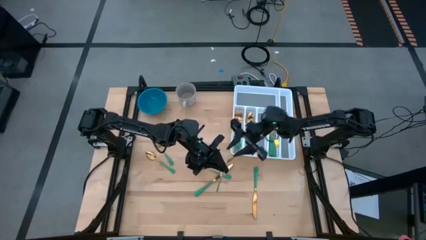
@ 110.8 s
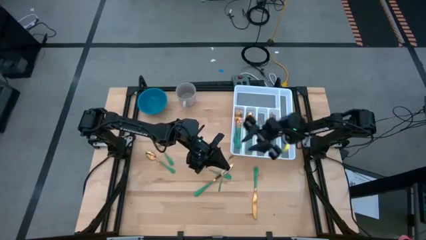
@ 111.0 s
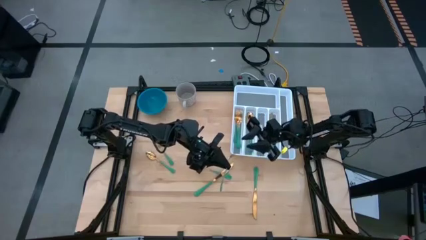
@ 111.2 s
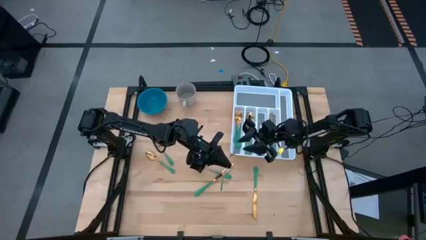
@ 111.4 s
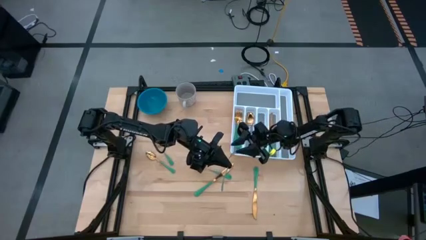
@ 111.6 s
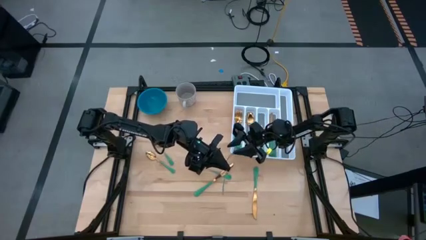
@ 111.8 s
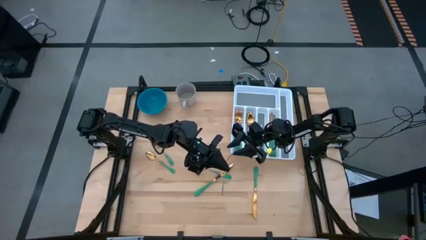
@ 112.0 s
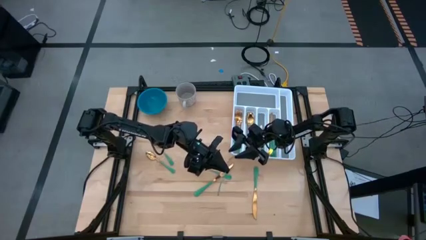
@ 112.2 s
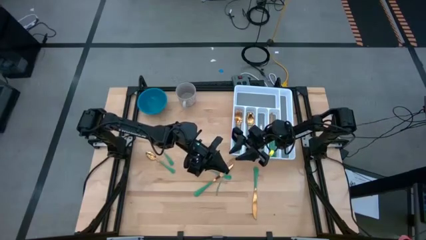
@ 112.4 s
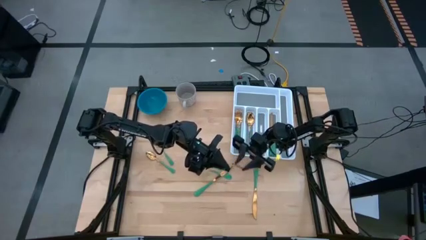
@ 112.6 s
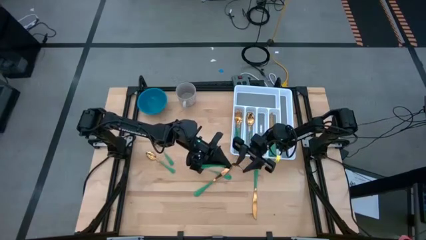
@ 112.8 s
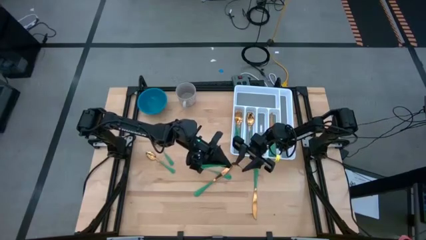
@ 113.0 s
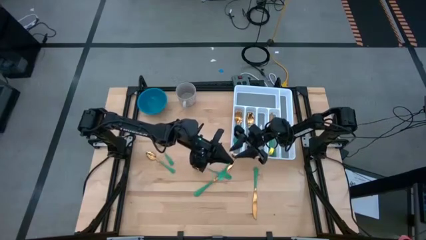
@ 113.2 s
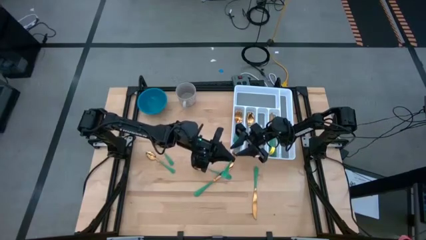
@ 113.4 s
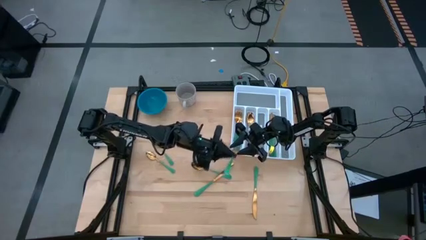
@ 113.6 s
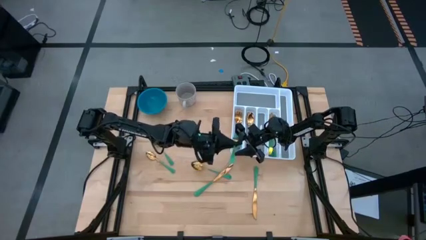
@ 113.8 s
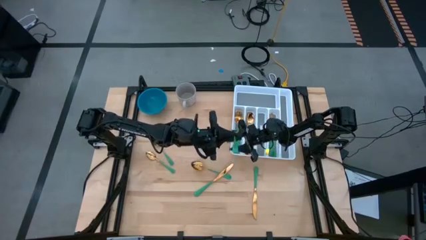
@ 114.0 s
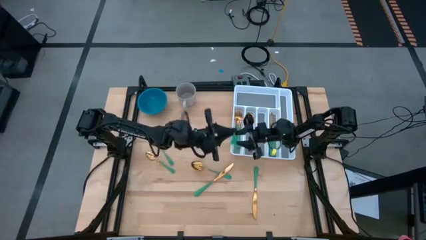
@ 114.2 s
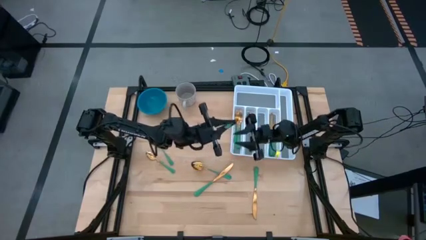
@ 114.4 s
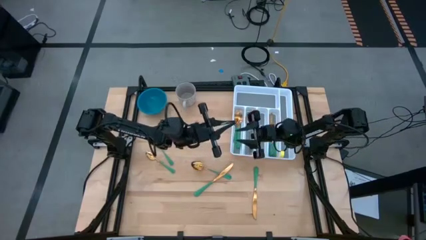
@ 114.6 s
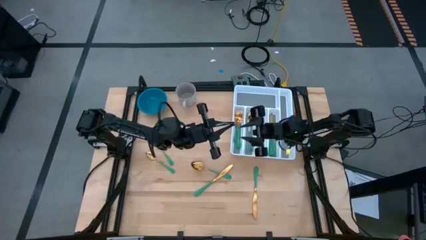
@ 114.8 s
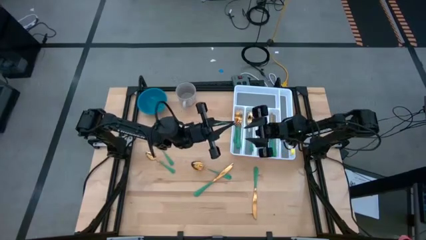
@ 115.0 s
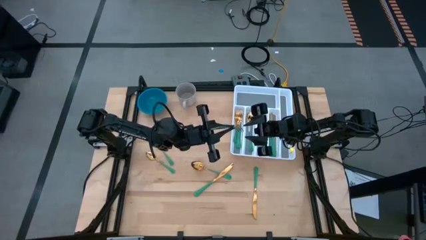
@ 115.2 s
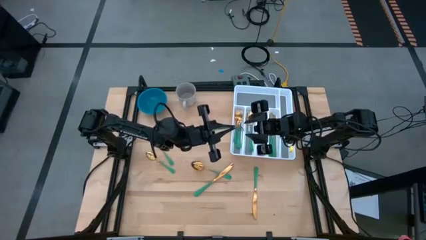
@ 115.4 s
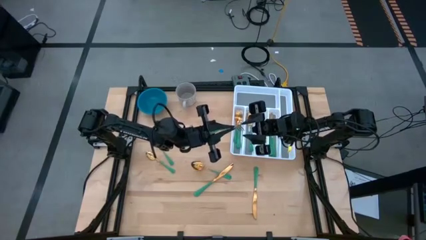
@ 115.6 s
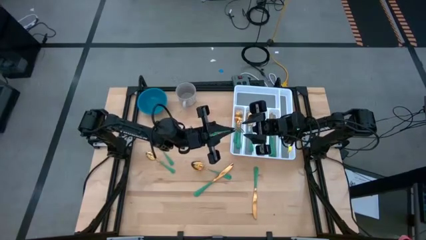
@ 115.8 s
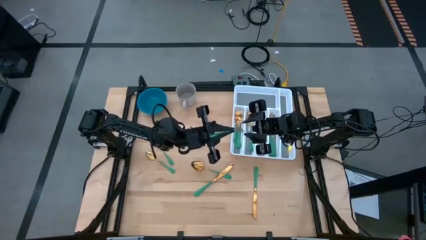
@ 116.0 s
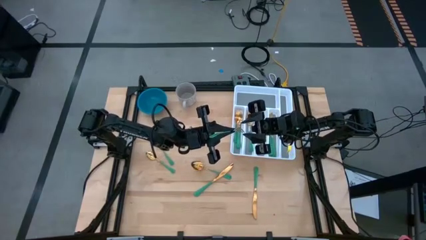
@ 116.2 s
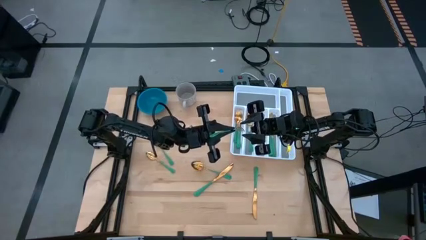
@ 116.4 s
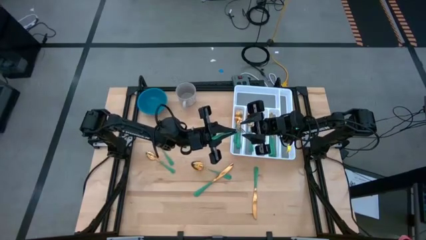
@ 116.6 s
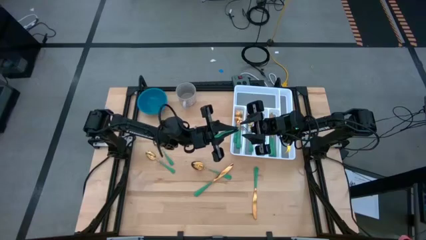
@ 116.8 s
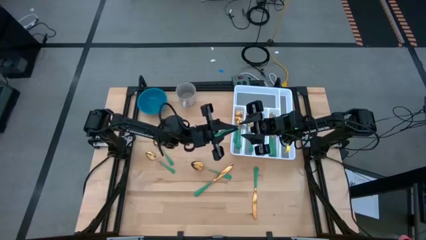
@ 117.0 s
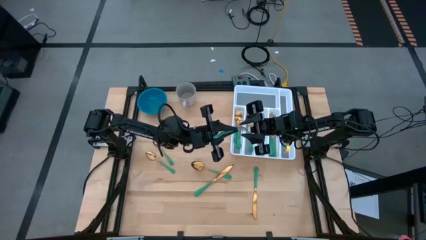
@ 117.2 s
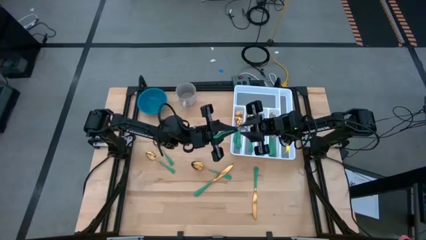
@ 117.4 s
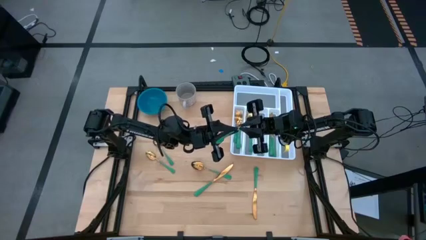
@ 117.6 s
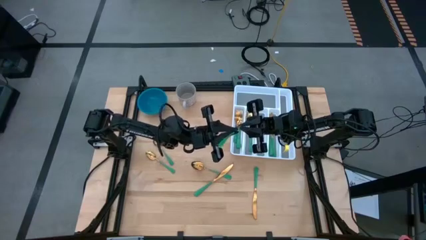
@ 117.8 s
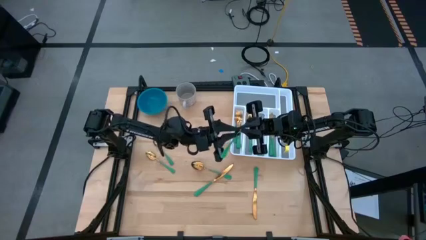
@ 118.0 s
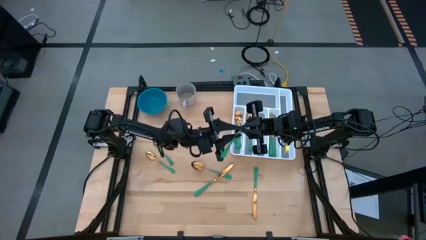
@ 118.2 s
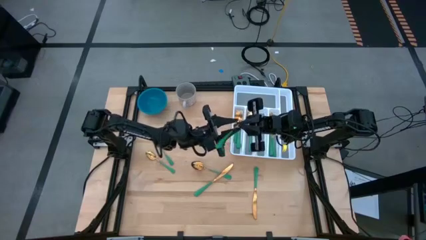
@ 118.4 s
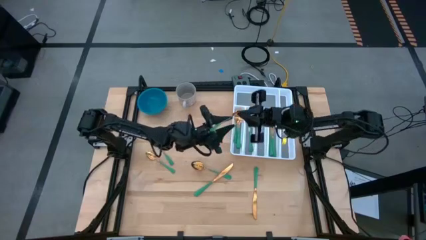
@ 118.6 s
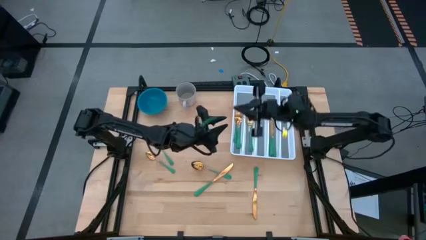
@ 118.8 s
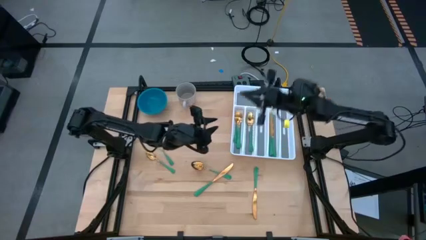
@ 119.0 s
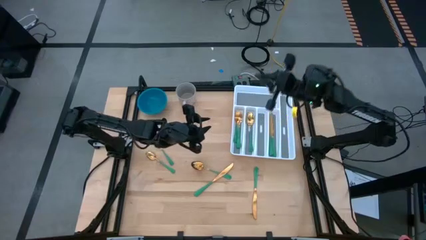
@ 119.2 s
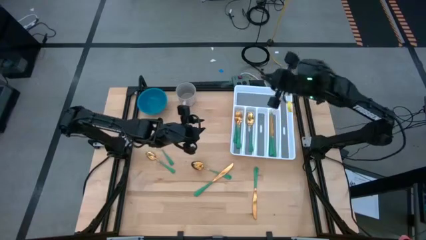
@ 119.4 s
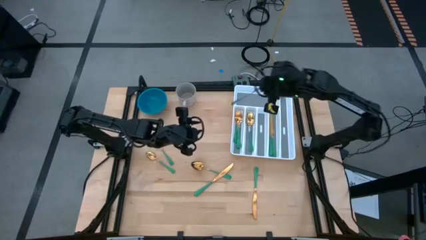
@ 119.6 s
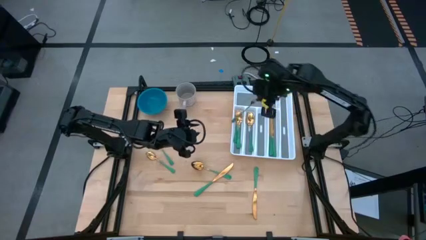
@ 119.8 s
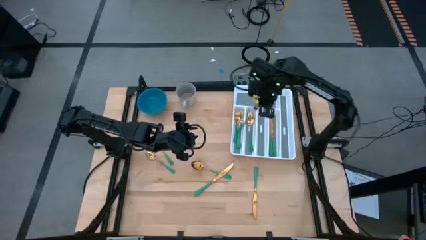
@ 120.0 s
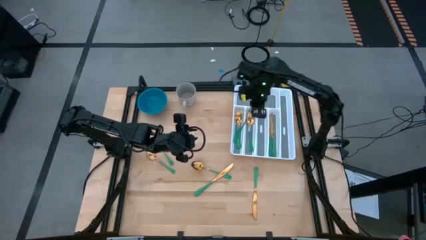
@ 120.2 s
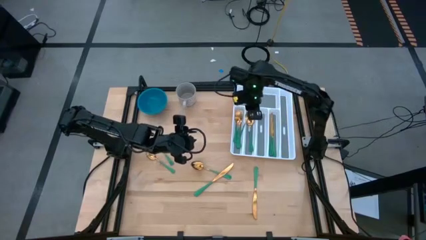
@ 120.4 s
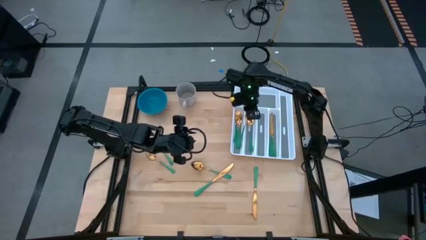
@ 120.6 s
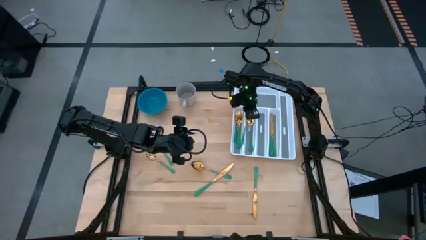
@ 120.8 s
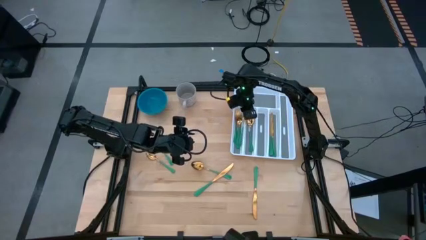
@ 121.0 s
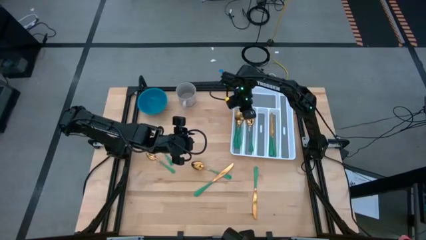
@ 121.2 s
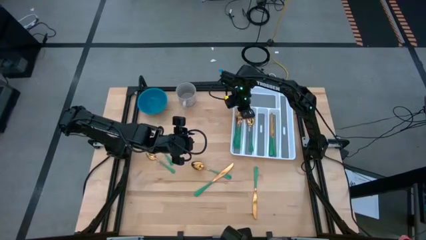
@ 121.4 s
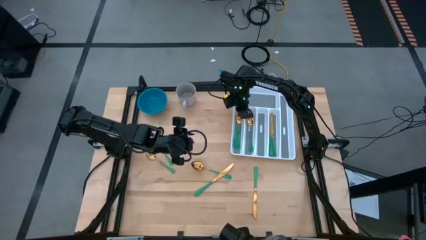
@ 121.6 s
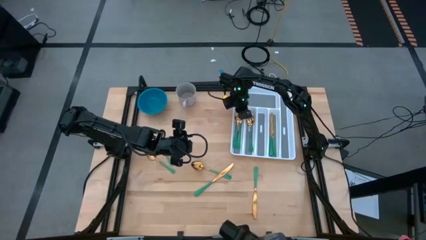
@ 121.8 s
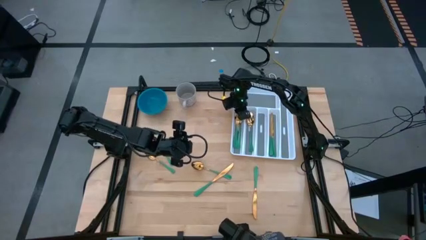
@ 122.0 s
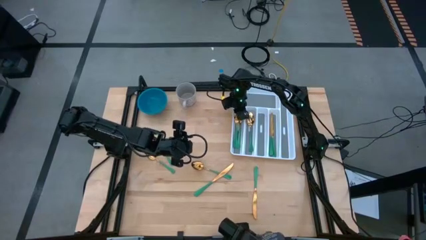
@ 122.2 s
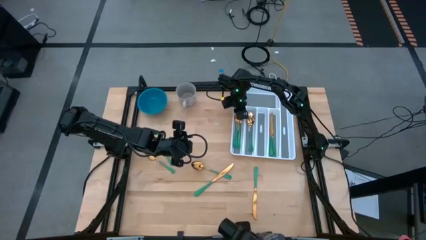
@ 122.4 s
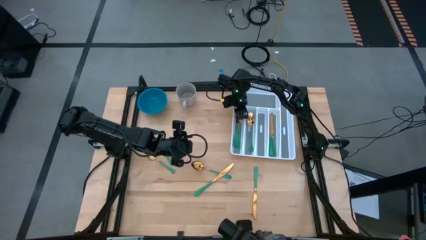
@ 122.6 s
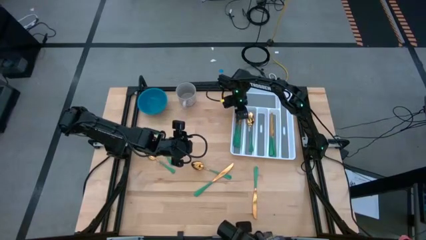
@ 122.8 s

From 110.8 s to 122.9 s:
Task: Sort silverware
Put the green fork into the white silverware organizer

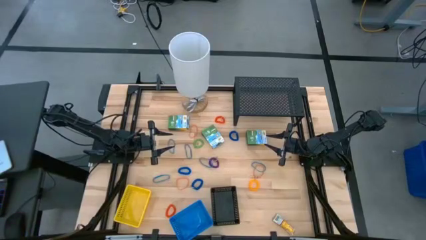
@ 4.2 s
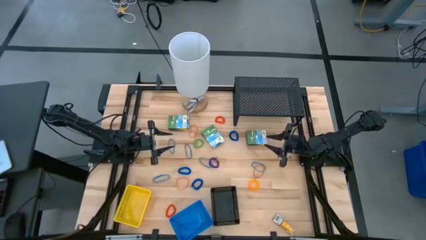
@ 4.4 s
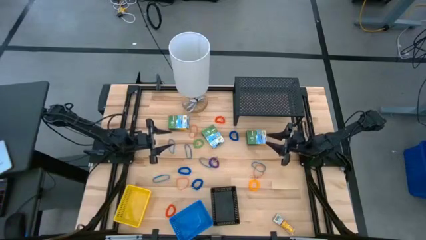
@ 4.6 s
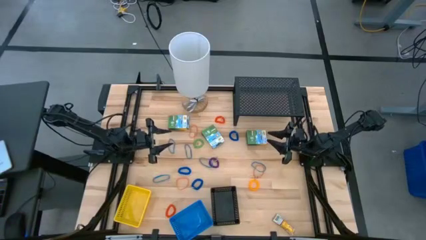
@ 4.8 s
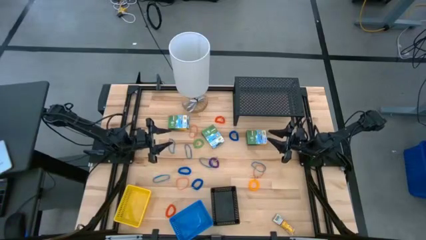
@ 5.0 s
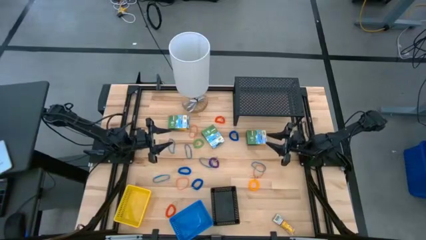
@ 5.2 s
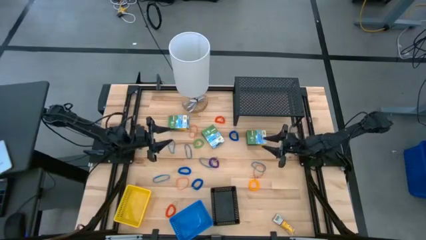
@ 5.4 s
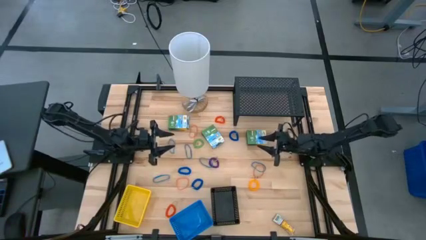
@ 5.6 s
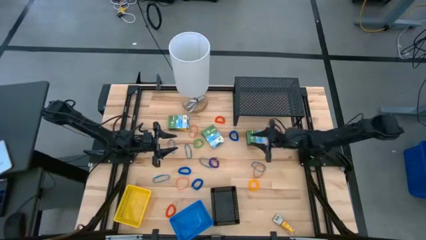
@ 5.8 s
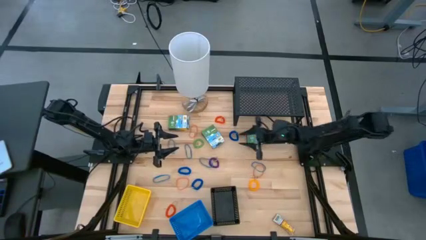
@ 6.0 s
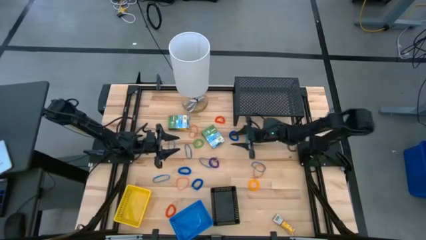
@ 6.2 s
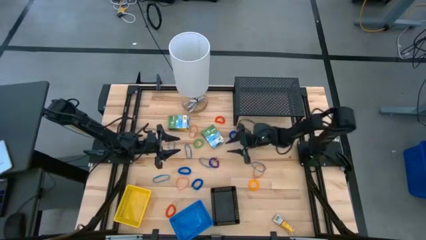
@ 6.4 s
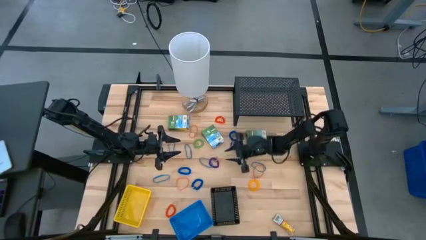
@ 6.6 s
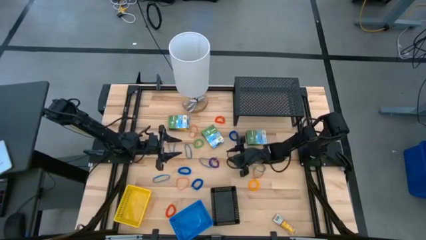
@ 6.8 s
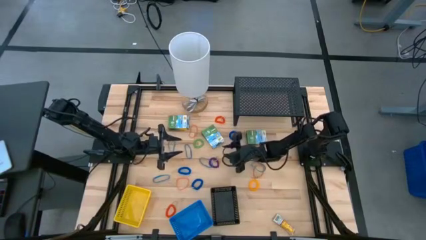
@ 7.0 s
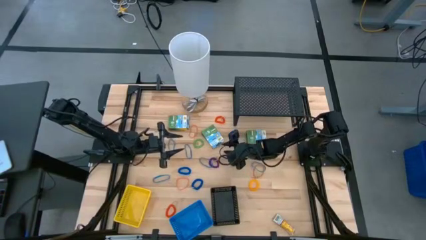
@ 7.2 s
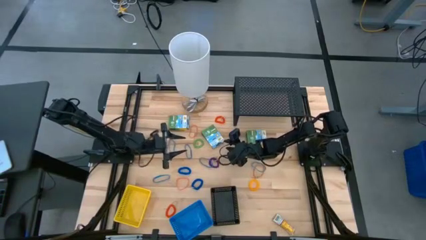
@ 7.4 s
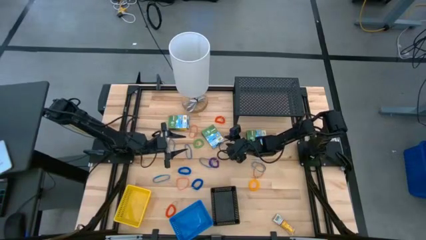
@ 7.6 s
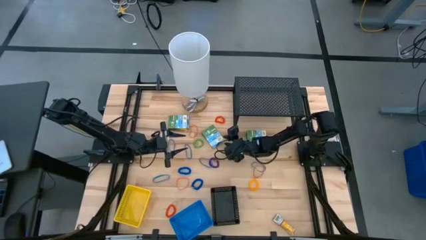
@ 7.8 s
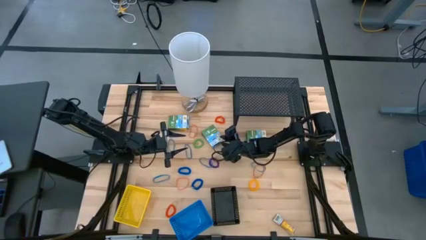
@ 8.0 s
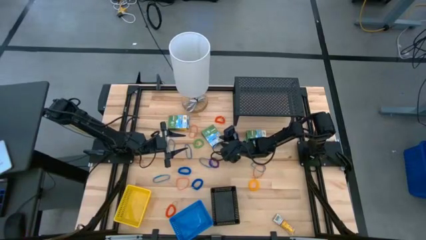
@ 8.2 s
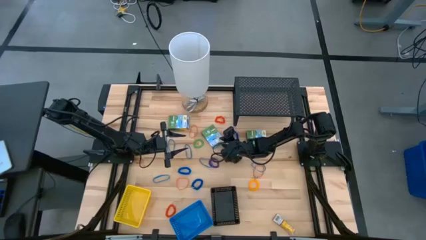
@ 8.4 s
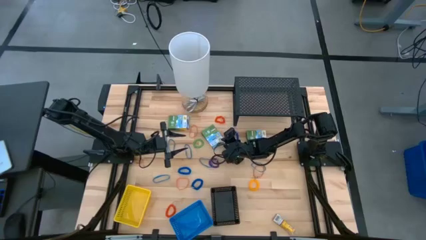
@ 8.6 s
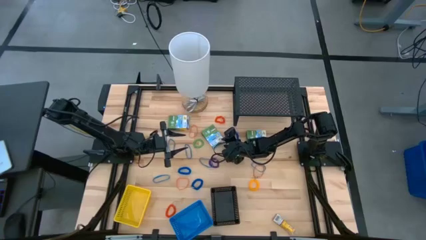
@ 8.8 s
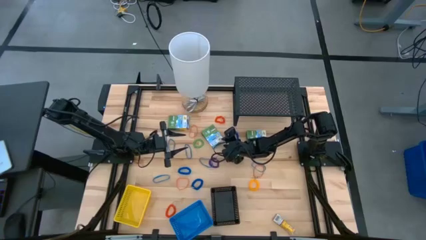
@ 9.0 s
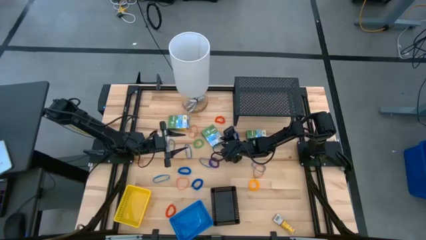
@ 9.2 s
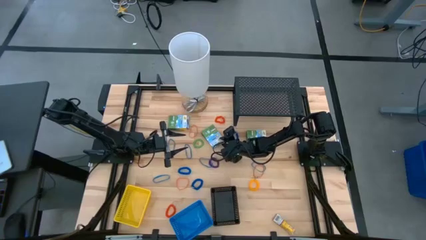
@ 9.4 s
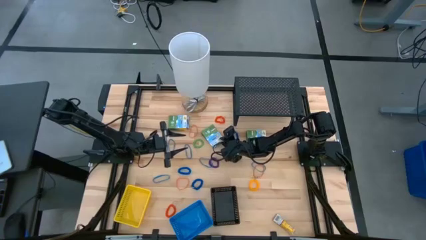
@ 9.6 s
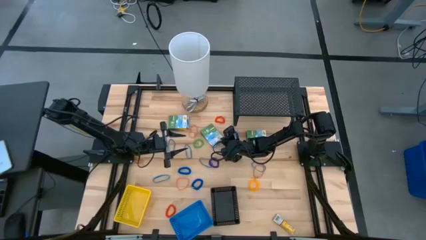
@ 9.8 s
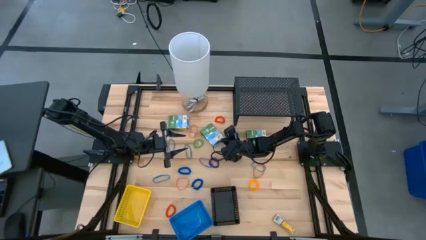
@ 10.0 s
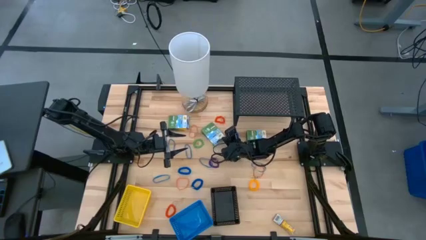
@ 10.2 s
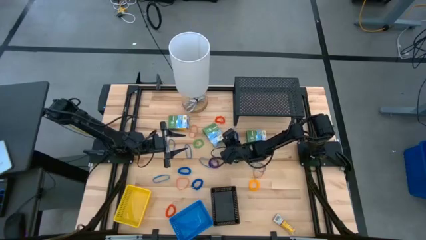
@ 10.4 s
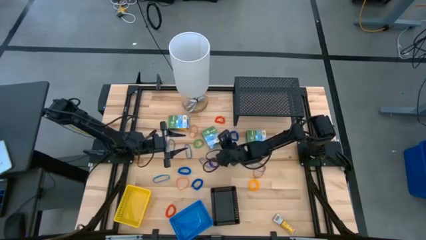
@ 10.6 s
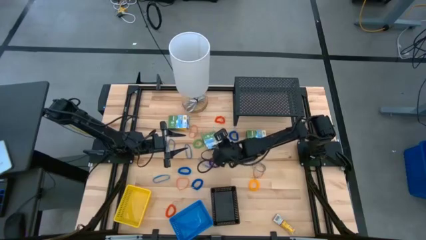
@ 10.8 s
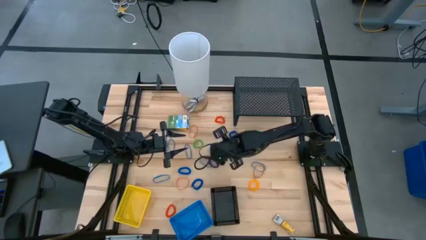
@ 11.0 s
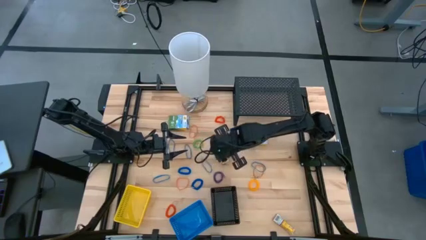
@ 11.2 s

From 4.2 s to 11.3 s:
Task: Pick & Place Office Desk Supplies
Put the yellow crayon box into the black bin
